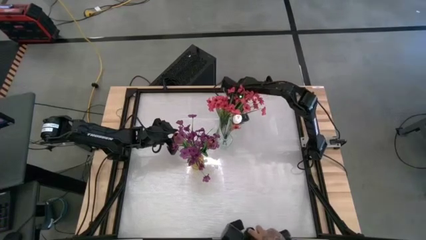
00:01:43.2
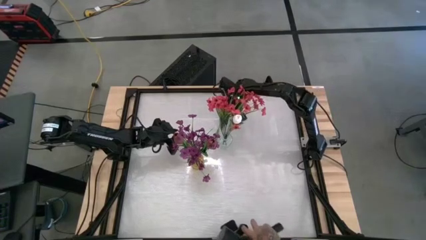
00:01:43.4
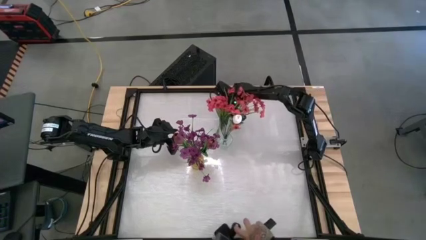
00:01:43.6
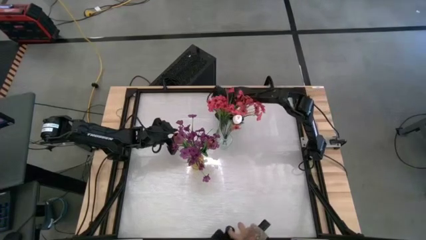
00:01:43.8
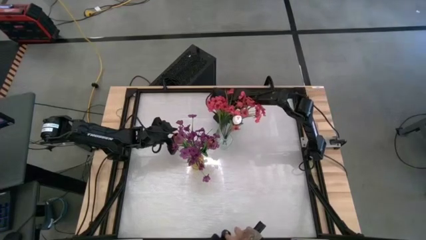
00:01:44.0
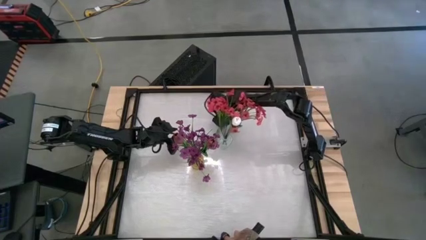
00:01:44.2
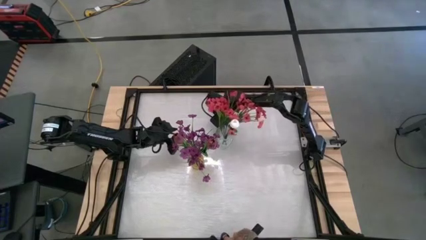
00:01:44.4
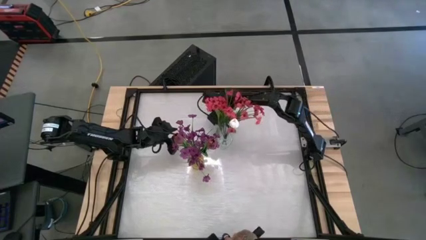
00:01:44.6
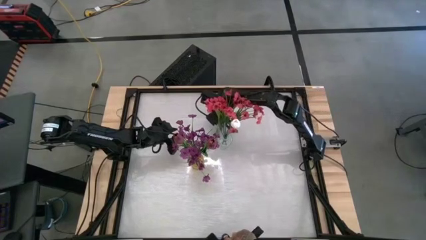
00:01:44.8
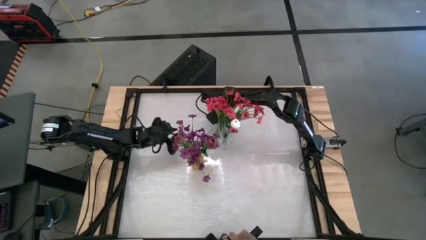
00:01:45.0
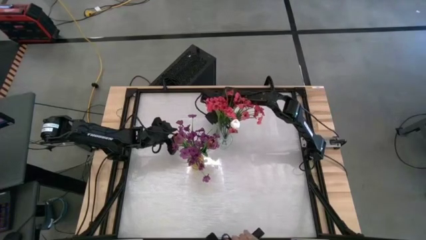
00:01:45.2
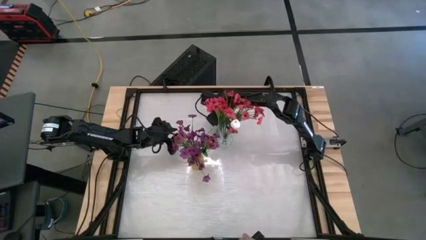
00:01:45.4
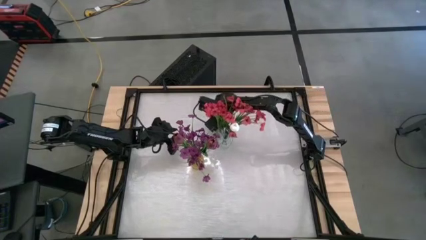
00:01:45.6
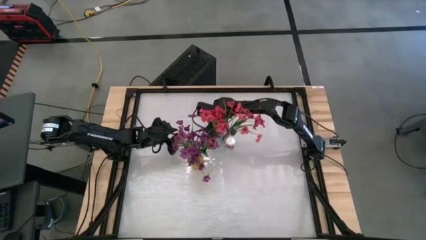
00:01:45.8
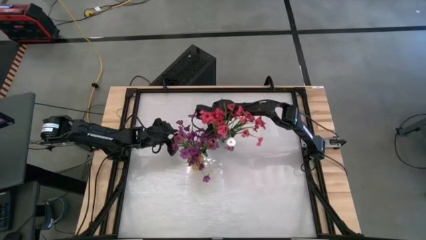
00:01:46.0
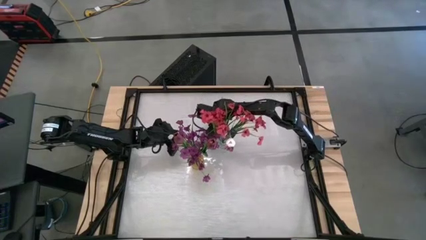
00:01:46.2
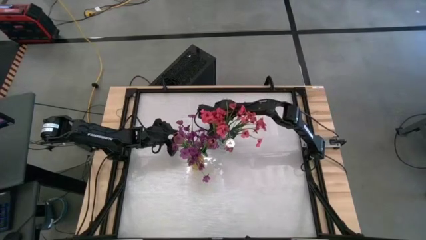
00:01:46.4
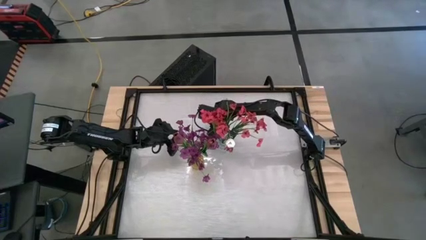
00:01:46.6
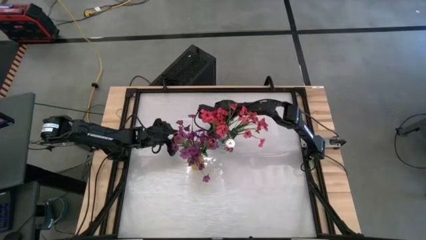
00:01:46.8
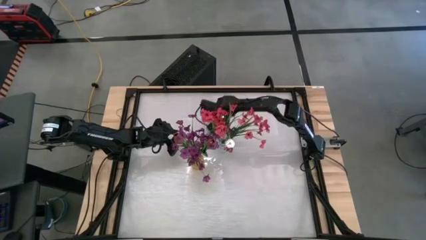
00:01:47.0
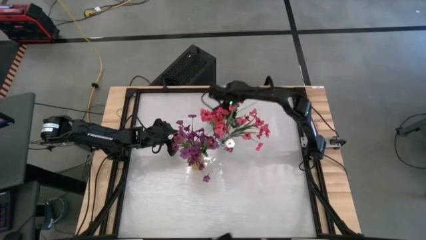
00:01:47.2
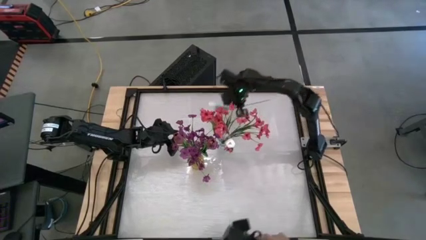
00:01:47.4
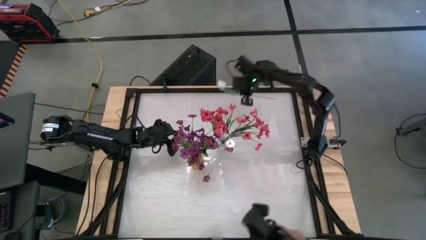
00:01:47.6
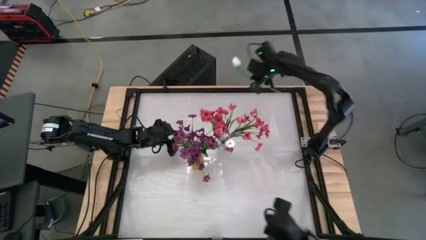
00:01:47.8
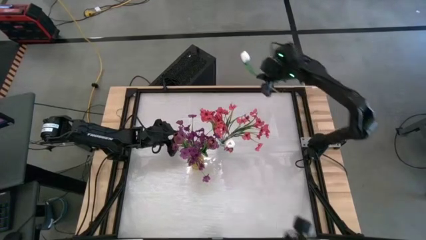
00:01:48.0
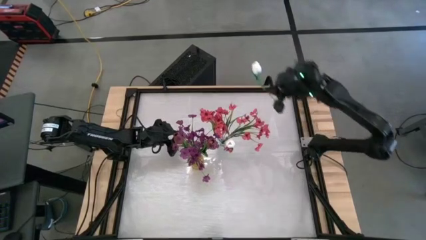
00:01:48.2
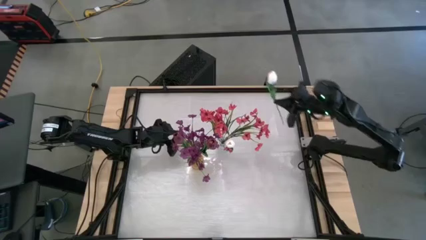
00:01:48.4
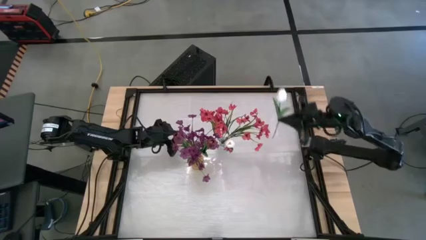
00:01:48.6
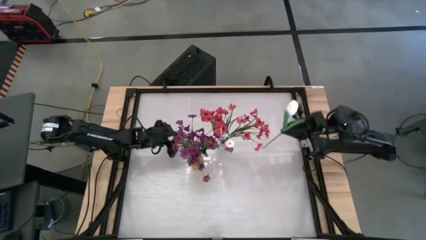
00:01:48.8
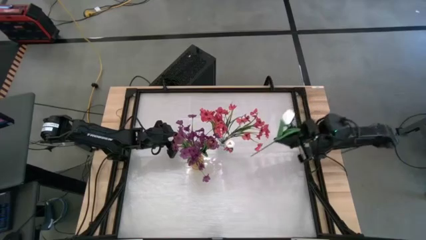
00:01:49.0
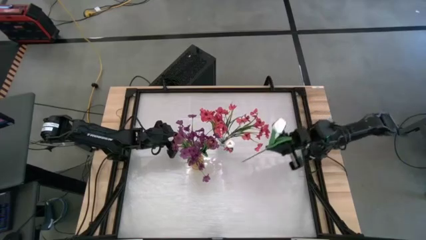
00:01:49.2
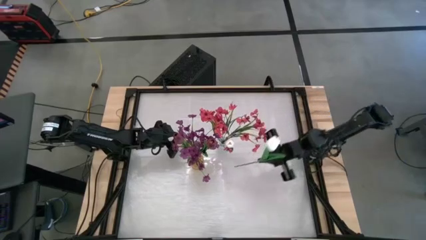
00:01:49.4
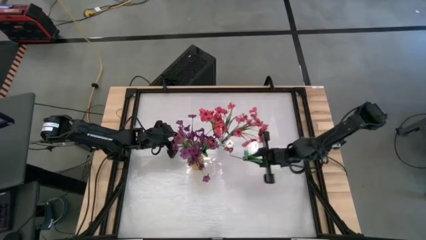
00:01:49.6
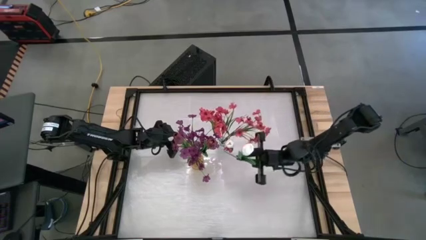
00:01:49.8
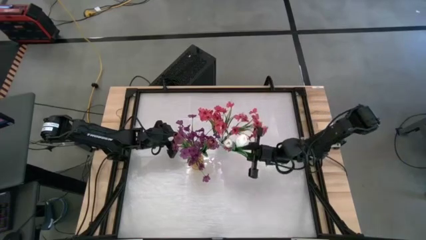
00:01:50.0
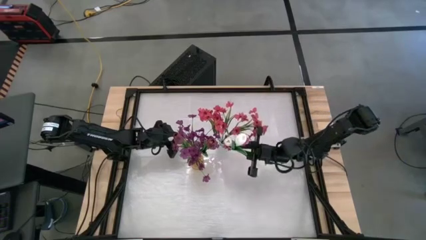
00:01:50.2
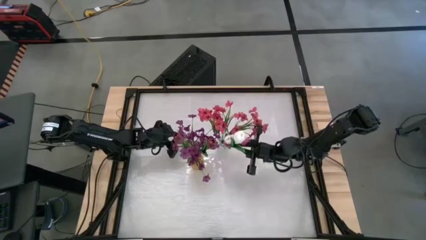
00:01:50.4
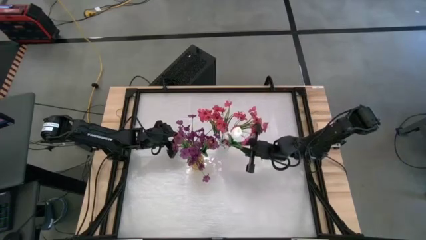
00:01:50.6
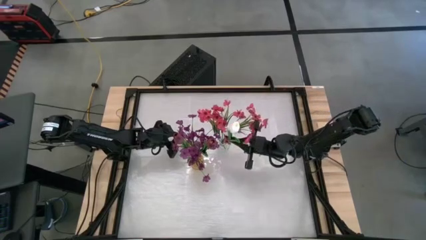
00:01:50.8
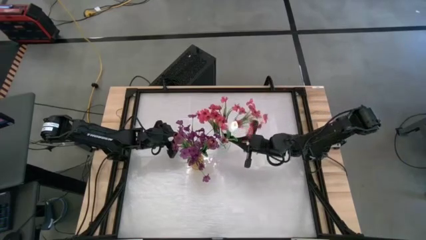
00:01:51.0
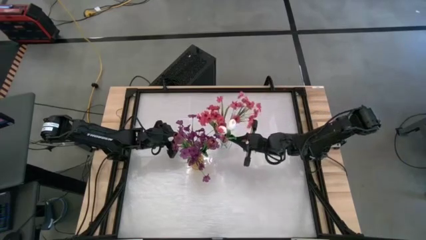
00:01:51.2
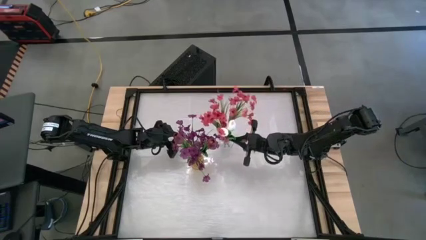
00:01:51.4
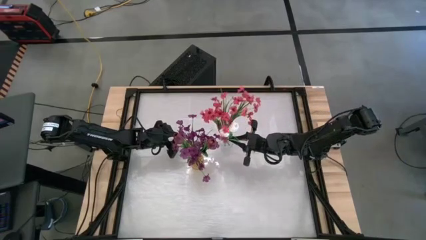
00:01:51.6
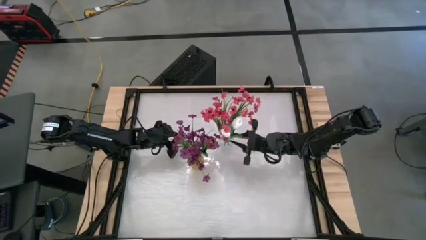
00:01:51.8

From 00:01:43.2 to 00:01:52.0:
Task: Sort flowers into vase by color
Put the white flower into the transparent vase

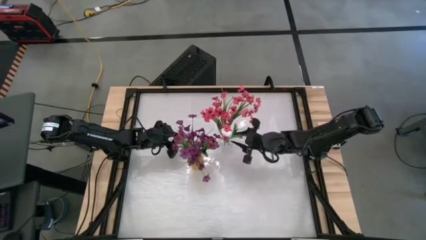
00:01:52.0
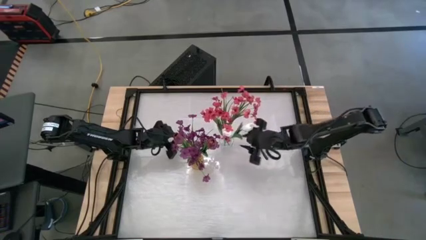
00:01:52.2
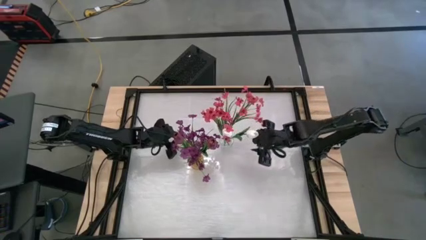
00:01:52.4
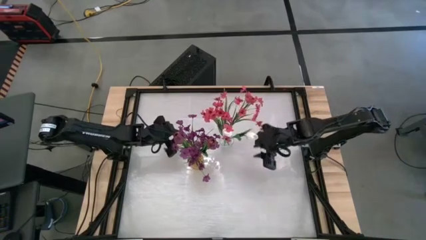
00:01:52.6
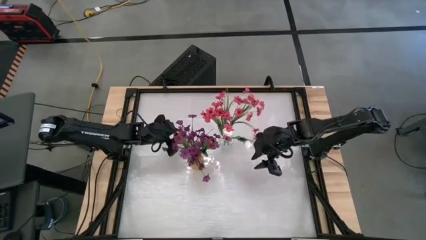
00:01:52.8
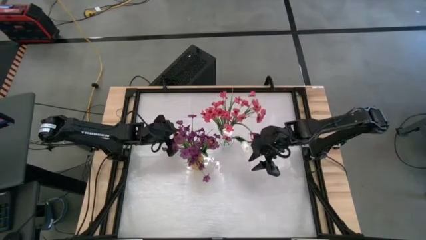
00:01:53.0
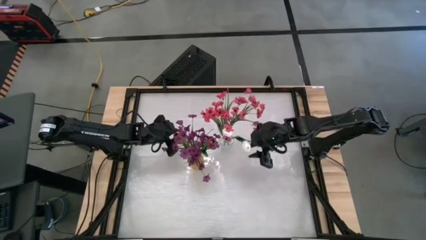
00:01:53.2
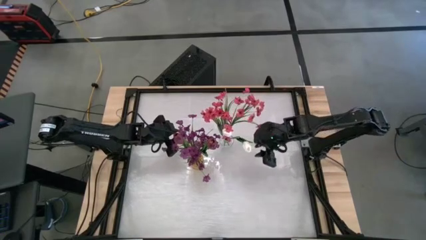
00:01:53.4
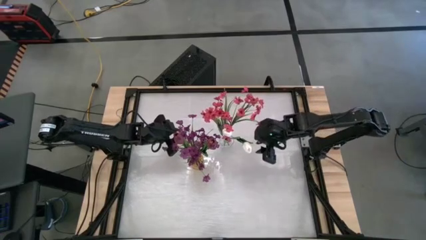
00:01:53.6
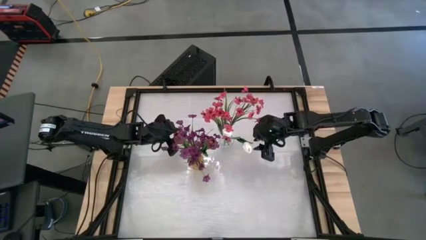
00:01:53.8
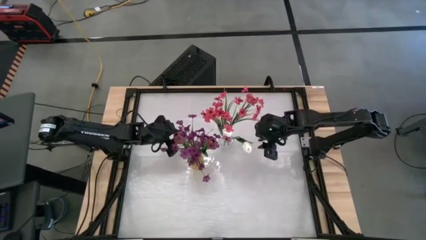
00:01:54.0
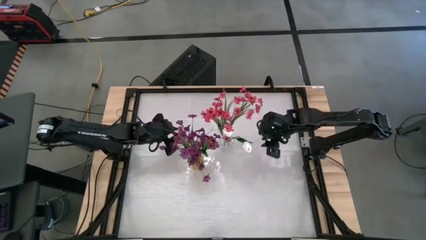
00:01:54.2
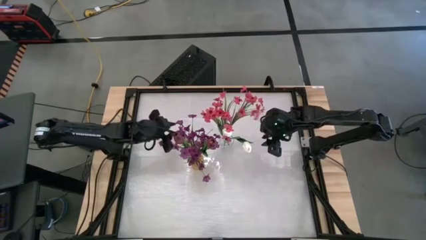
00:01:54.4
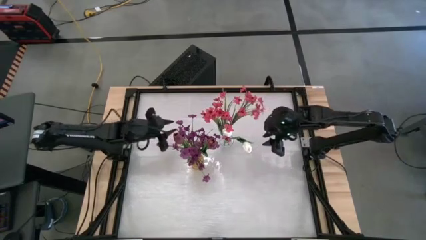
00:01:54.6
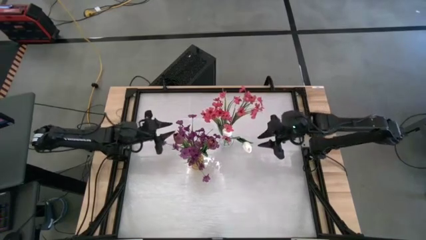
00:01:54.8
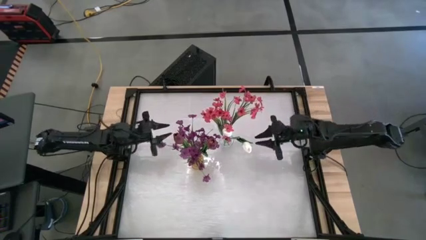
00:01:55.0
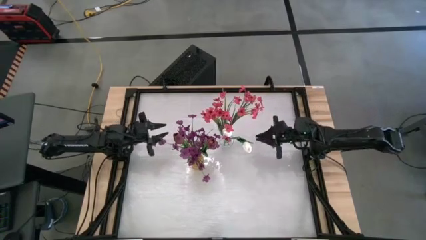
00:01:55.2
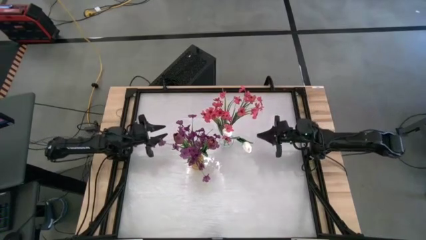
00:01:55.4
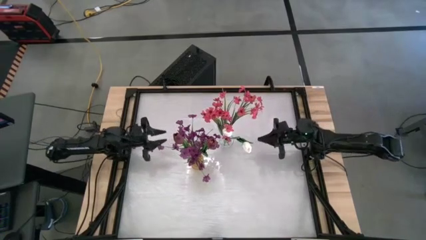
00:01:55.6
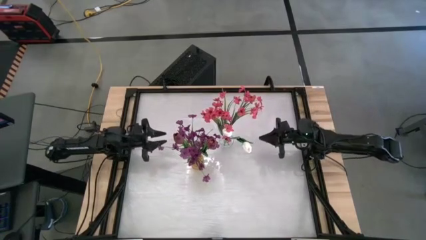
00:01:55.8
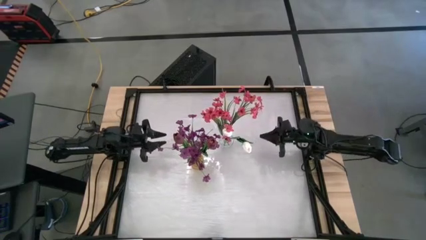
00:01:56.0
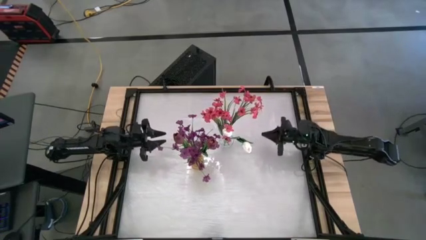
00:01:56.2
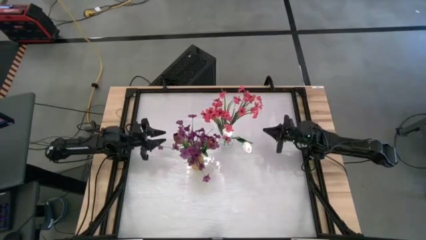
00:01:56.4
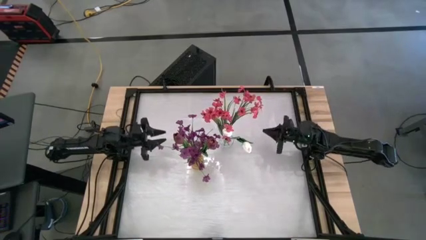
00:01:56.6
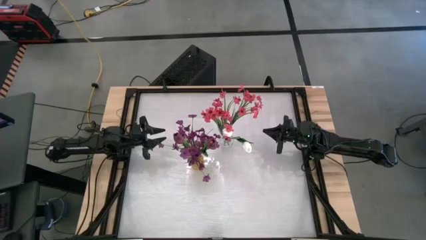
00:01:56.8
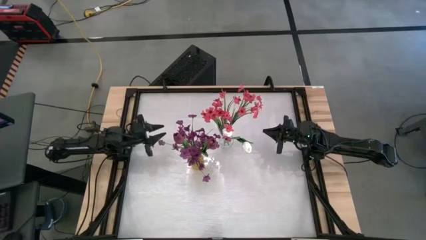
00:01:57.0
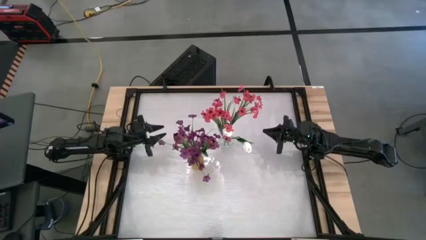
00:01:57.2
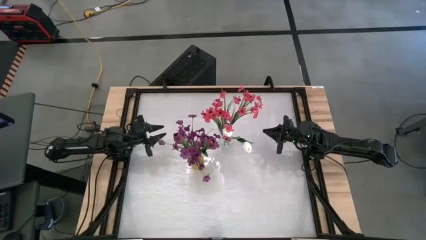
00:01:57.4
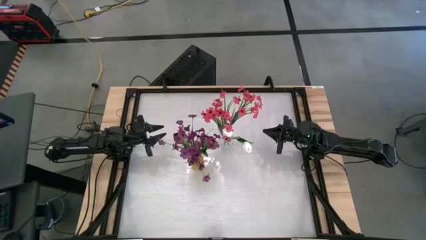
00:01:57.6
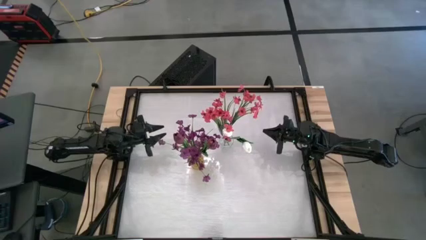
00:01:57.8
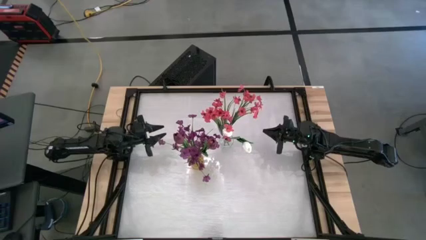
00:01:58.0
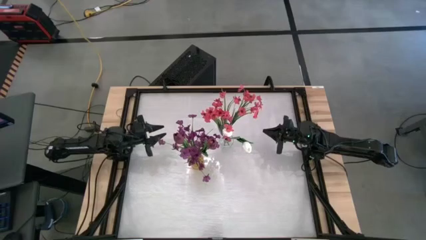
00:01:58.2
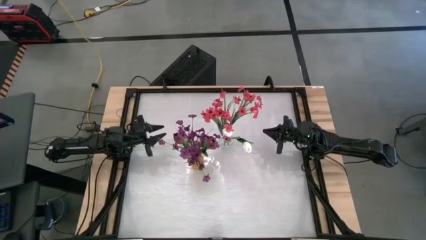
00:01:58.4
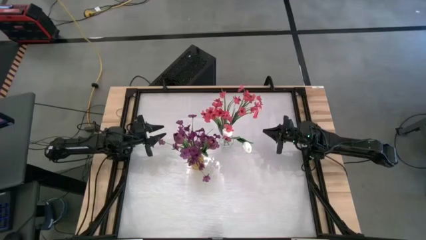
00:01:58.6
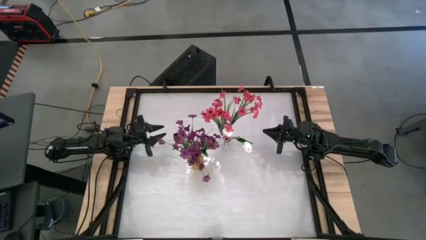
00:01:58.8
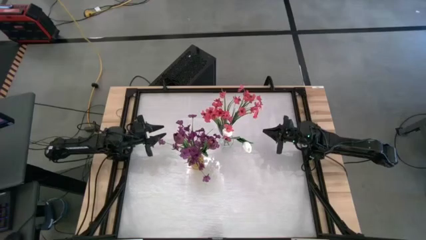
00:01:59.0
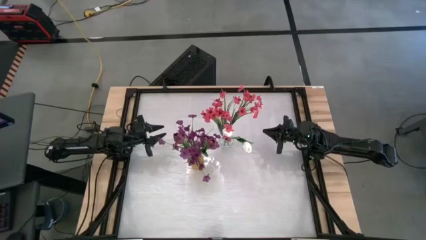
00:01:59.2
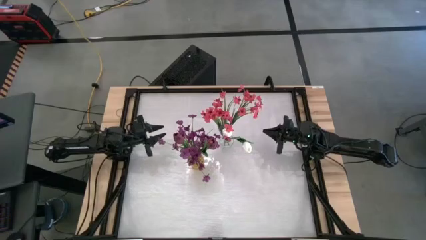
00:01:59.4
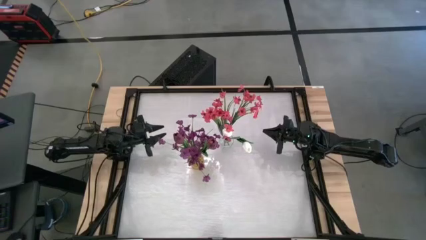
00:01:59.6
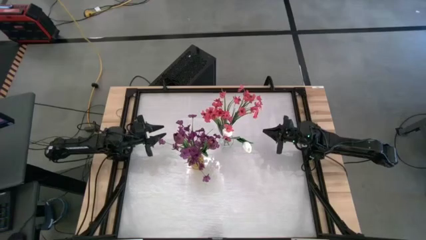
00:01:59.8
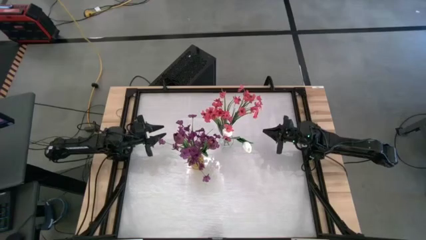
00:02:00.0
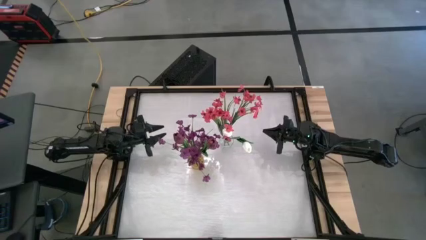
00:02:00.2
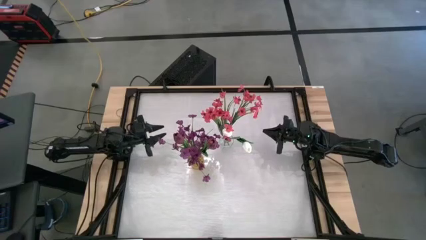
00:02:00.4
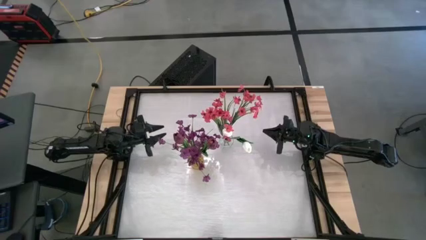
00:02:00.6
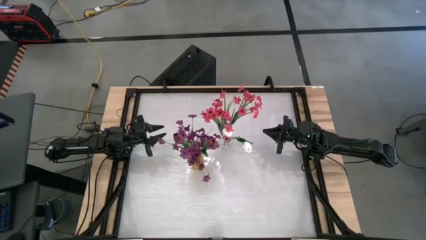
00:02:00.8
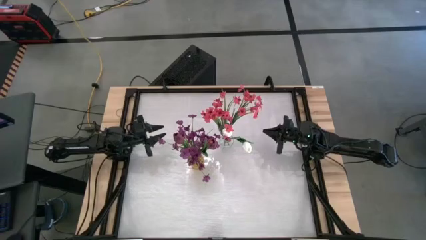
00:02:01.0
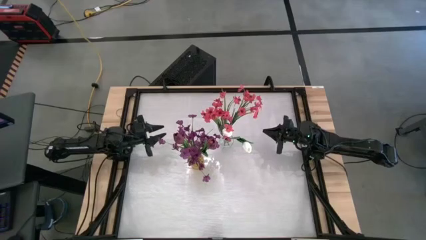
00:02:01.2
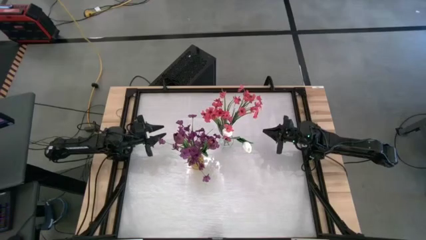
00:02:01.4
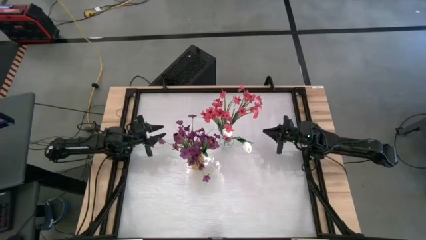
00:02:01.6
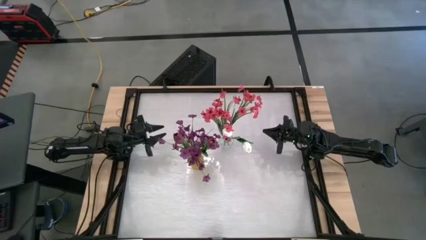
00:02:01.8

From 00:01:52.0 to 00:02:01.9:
Return to Home Position
